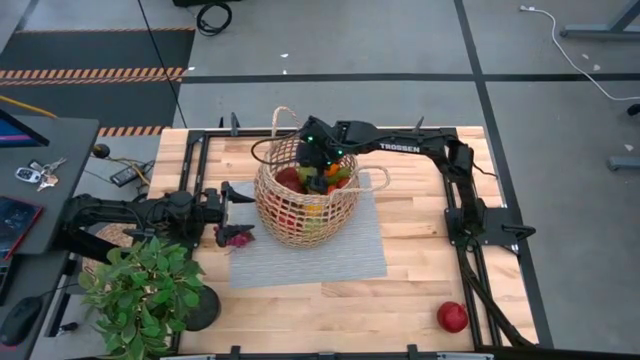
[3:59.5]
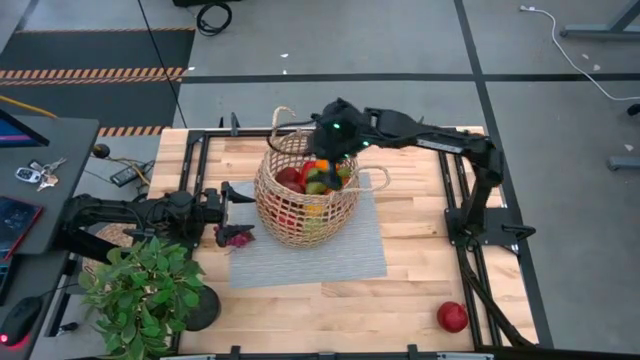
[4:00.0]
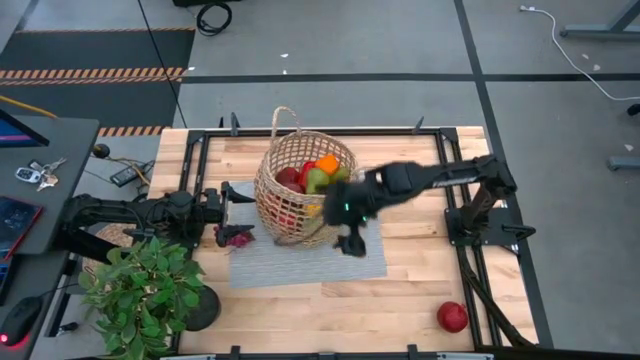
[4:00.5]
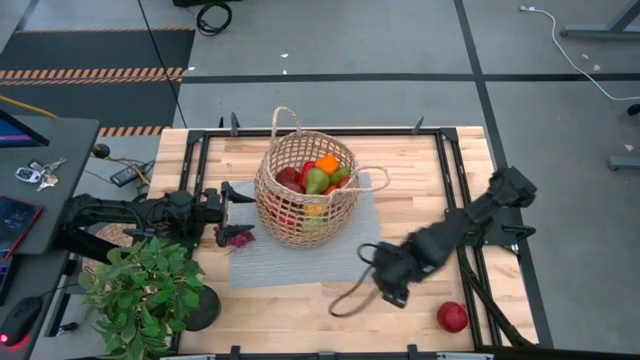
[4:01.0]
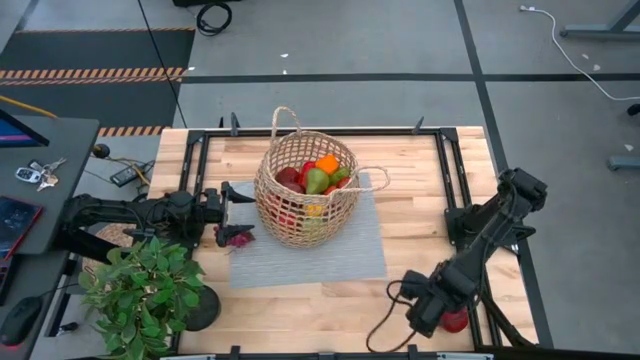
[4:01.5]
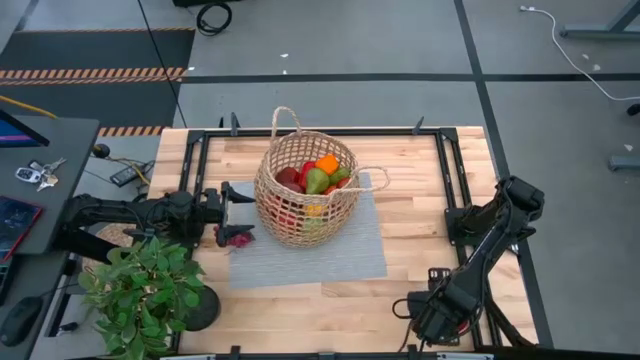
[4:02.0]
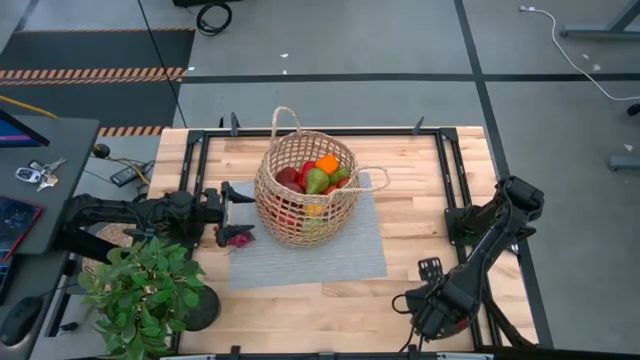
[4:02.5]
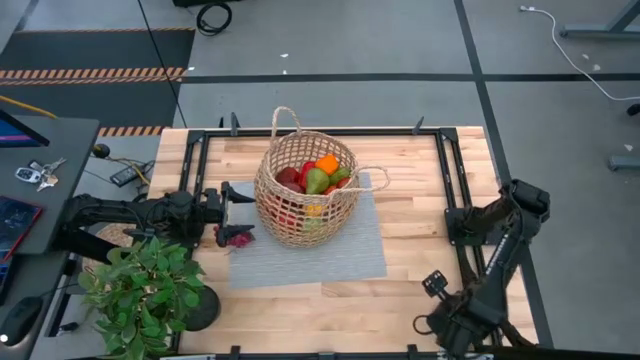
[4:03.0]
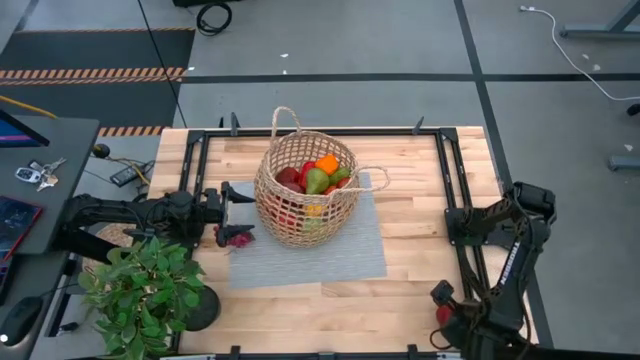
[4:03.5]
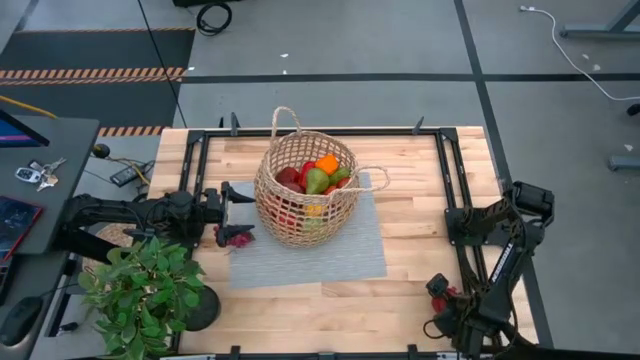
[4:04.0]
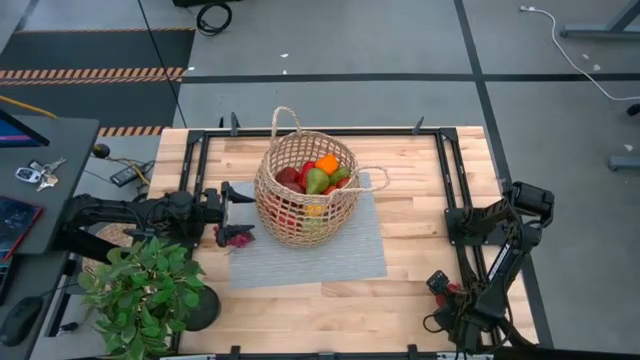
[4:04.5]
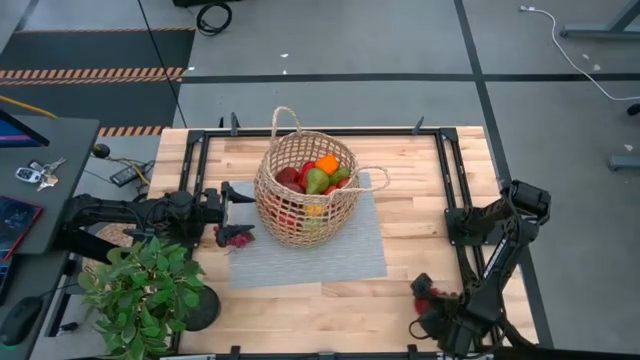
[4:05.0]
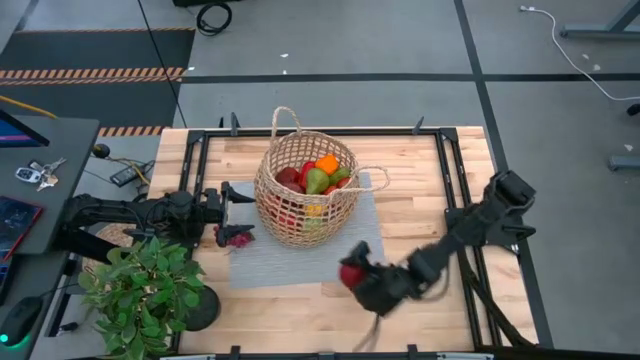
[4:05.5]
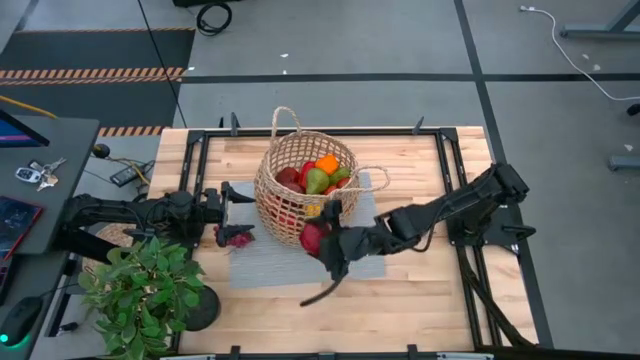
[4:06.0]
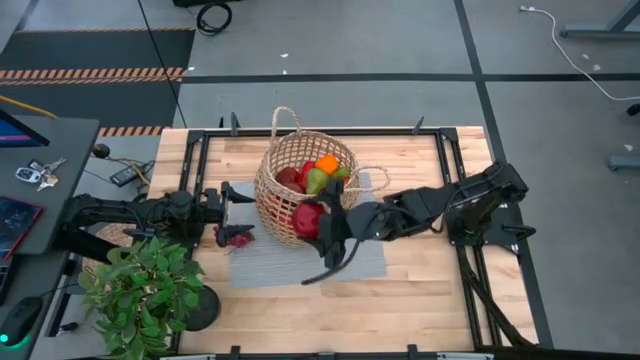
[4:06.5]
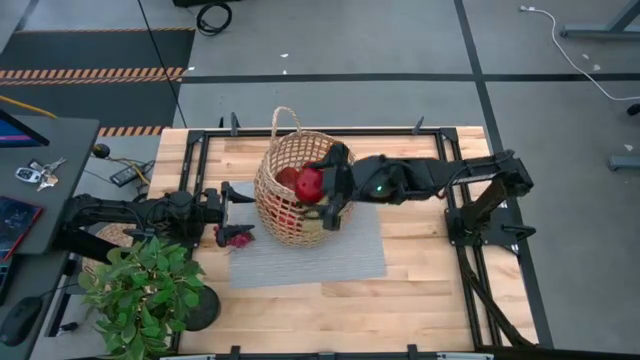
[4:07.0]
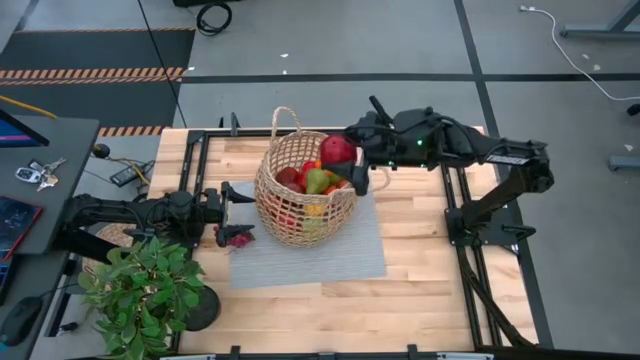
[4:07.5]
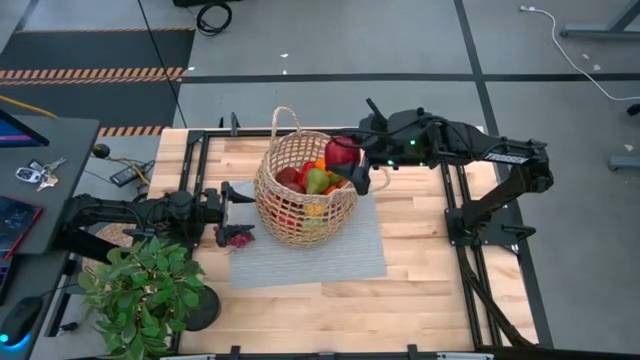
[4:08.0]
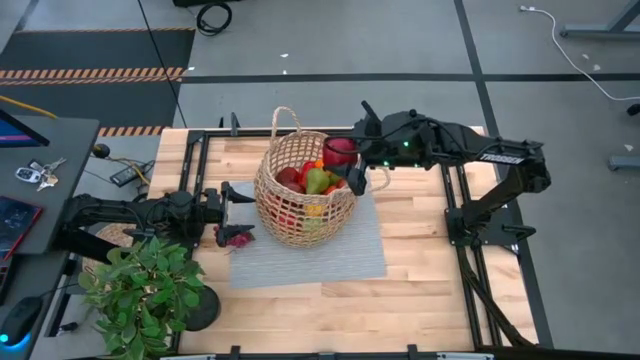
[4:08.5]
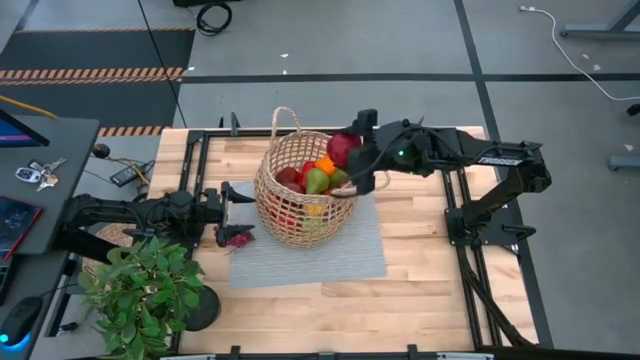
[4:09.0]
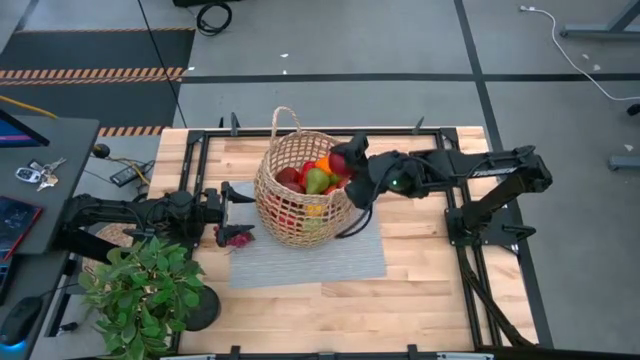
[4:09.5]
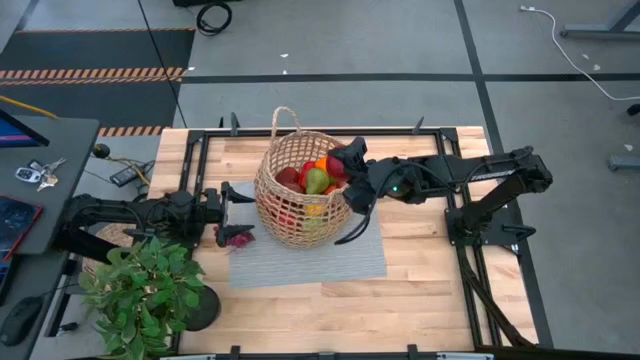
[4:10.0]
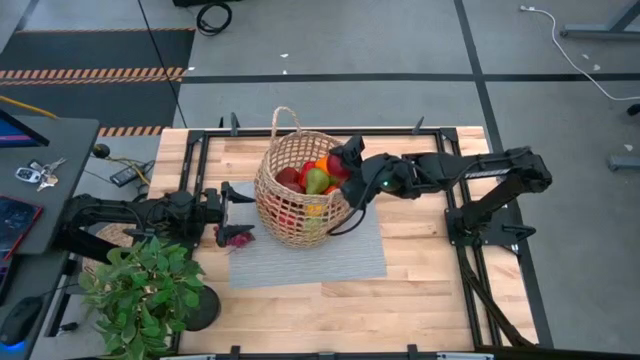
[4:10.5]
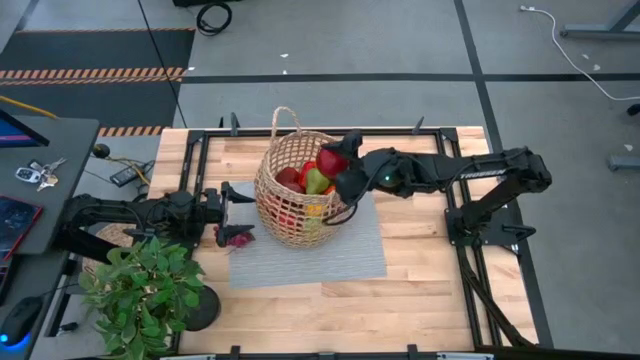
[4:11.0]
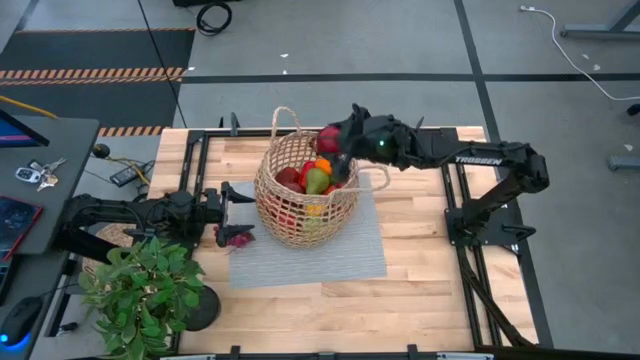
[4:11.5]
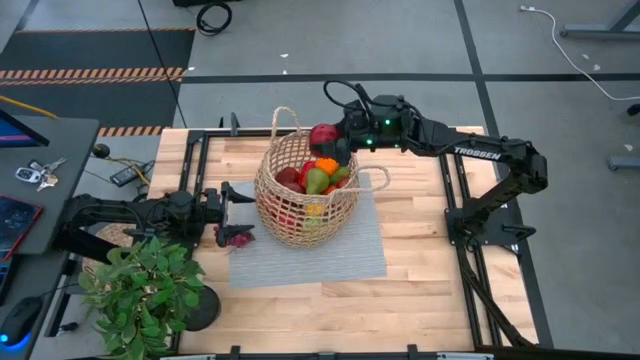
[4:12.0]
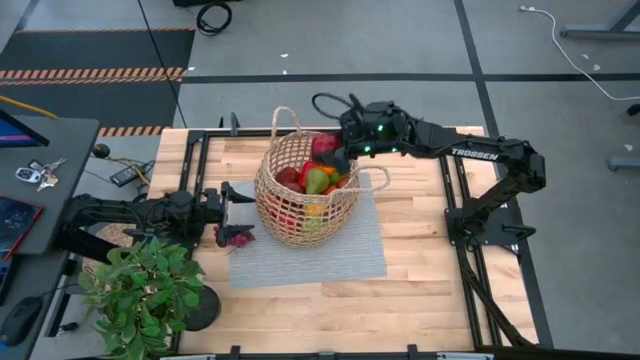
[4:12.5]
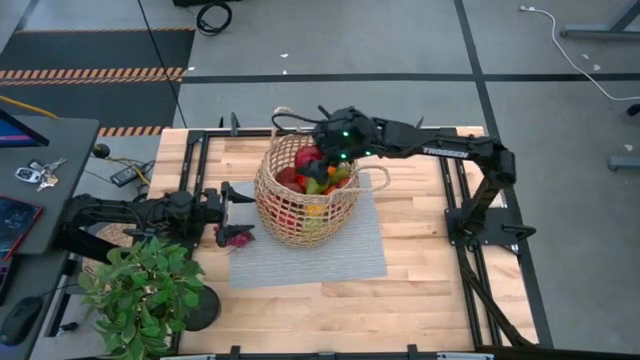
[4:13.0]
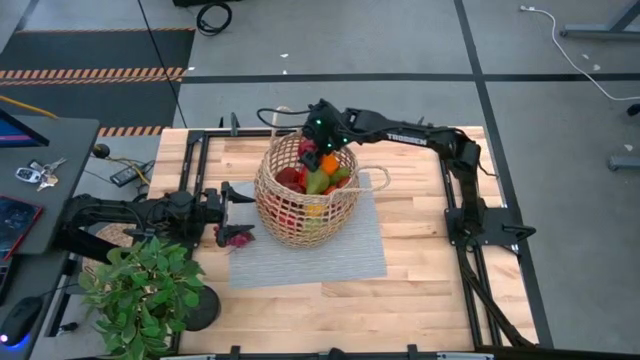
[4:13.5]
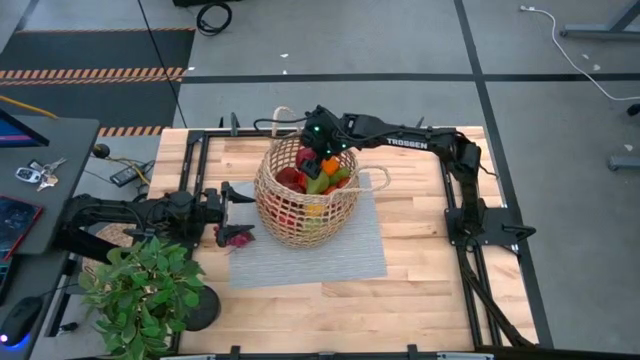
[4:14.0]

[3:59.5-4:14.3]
Task: Build produce basket
Put the red pomegranate into the brown basket

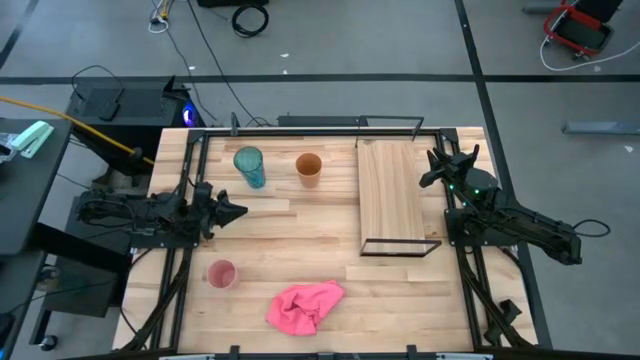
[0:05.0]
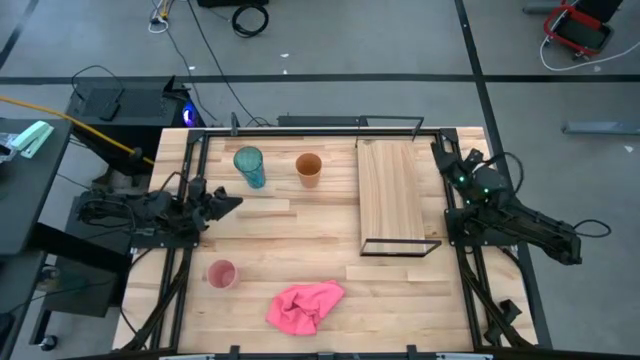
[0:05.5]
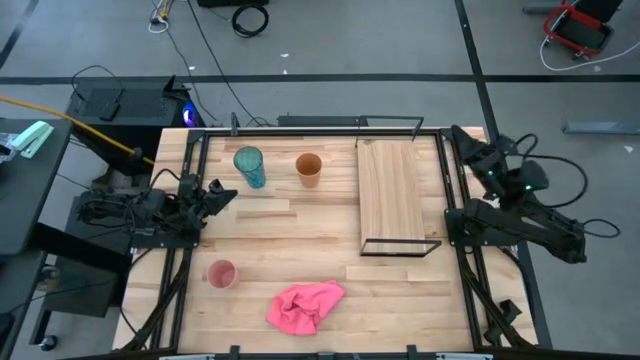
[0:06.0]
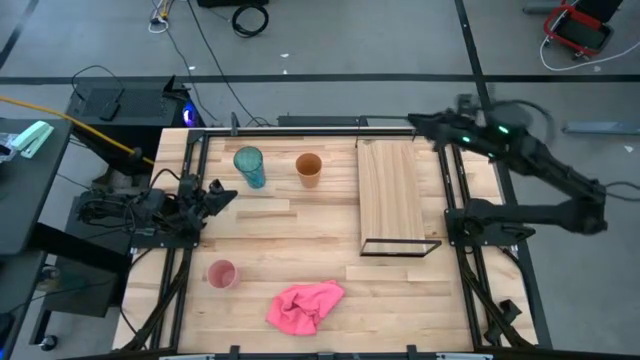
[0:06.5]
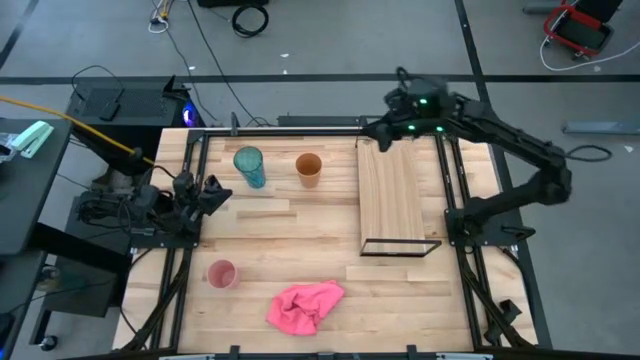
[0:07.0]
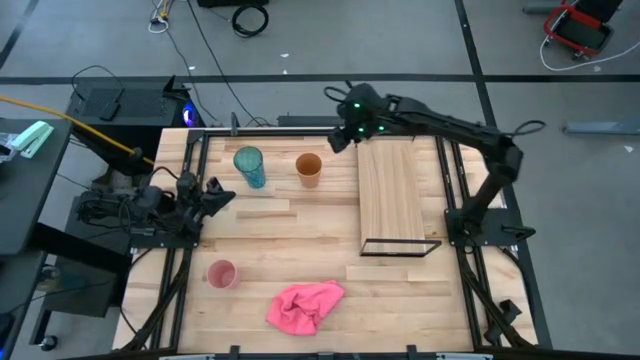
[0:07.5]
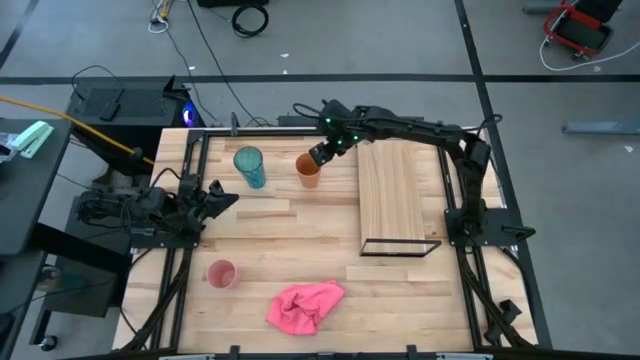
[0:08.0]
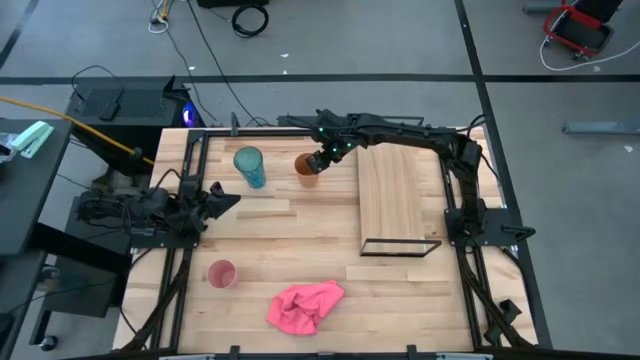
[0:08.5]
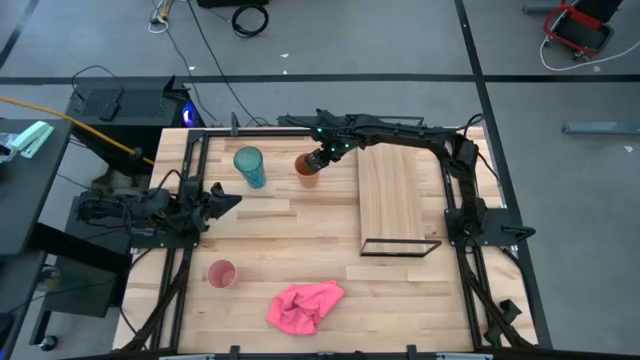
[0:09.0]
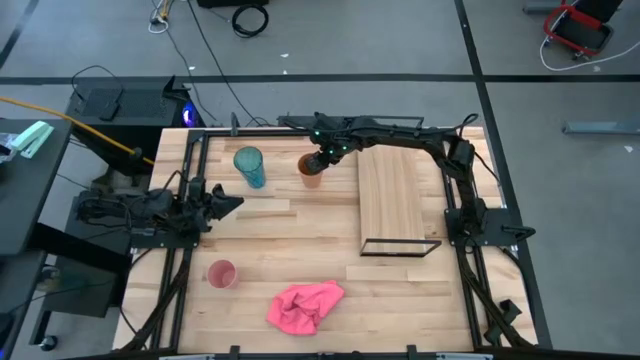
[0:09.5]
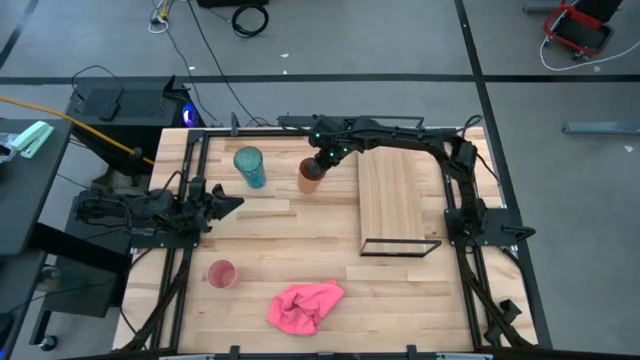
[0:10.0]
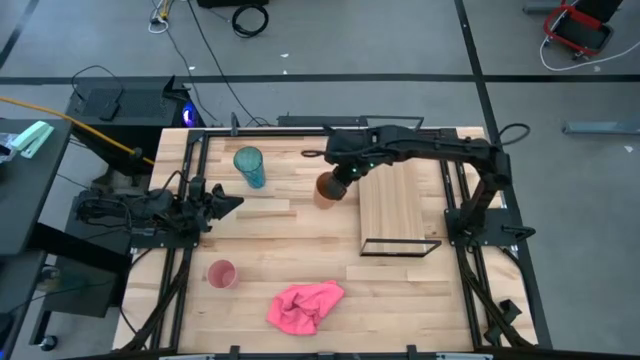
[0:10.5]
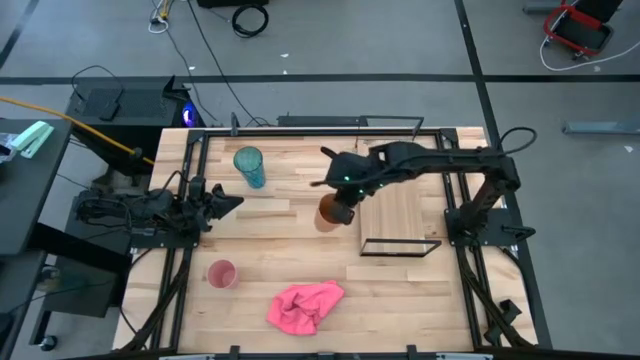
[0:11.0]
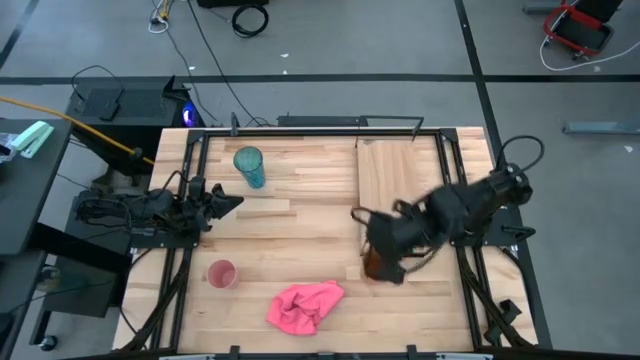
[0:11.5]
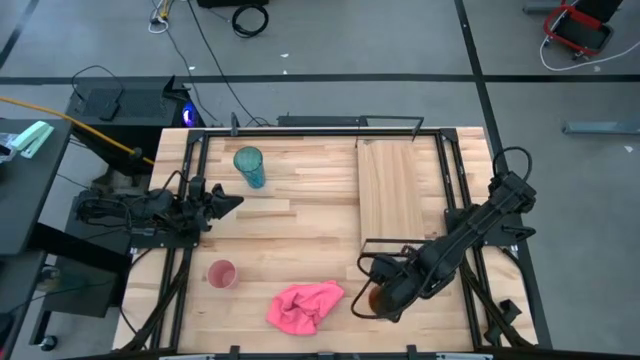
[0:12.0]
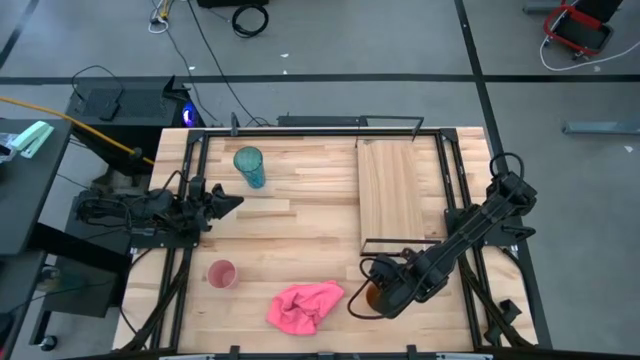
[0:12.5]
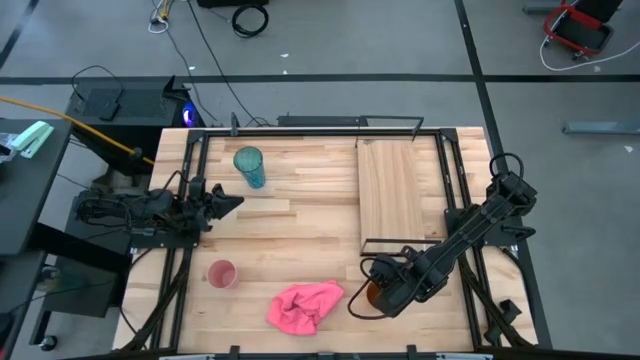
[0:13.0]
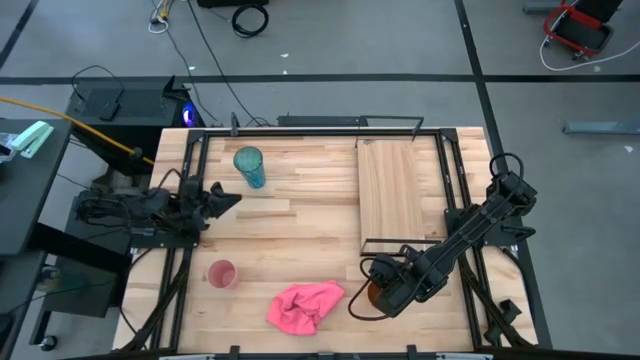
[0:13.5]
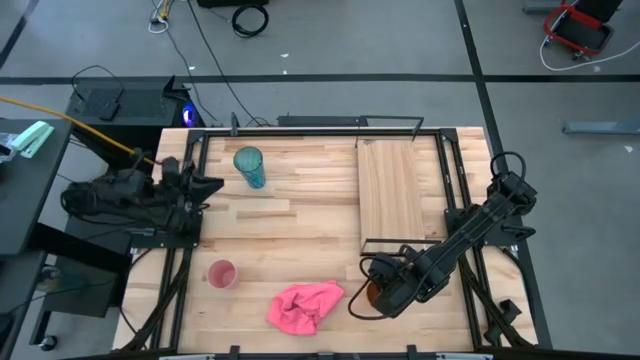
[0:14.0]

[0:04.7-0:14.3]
Task: Stack small to large cups/mugs on shelf
Move the orange cup to the bottom right of the table
